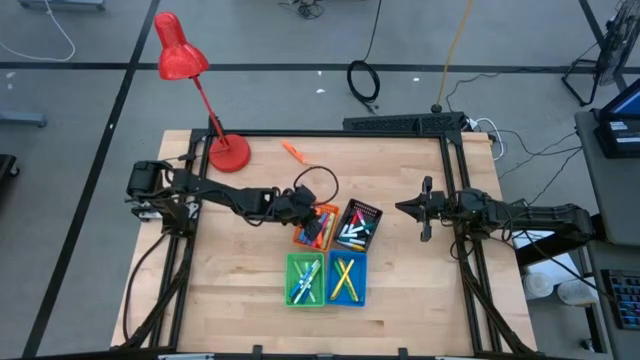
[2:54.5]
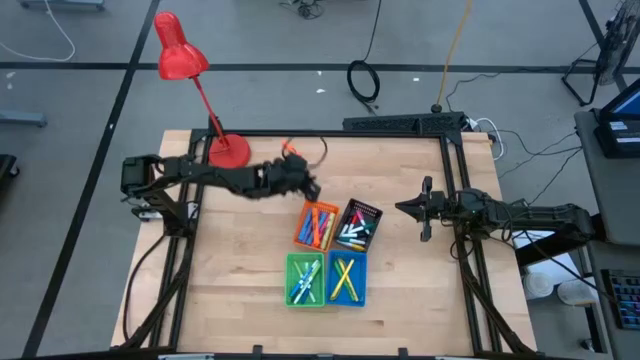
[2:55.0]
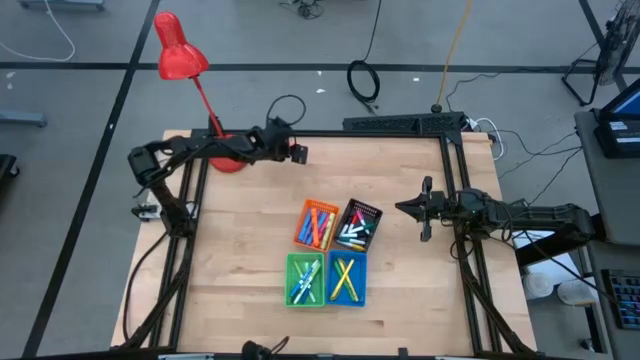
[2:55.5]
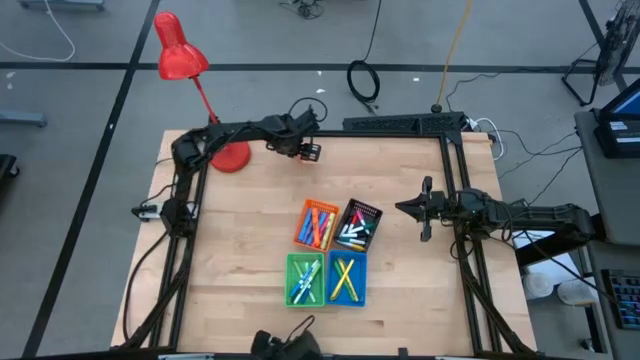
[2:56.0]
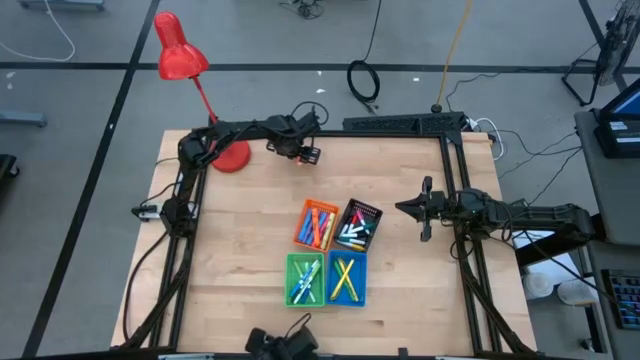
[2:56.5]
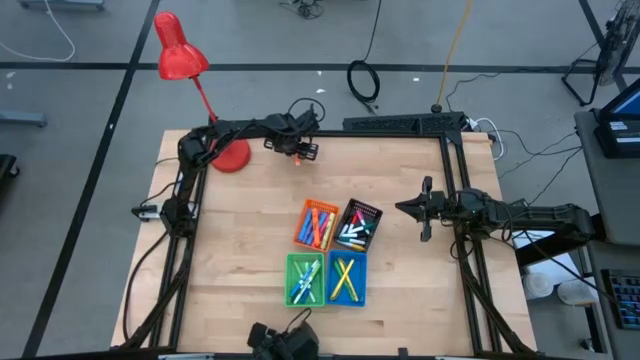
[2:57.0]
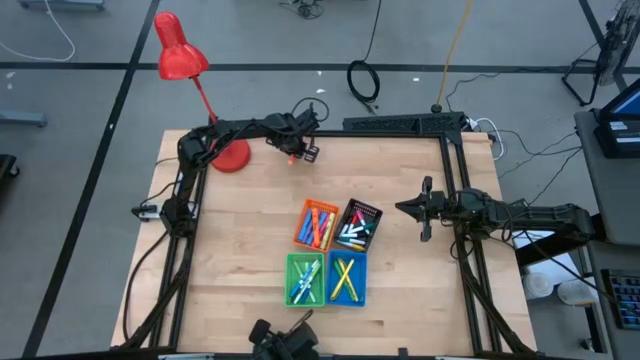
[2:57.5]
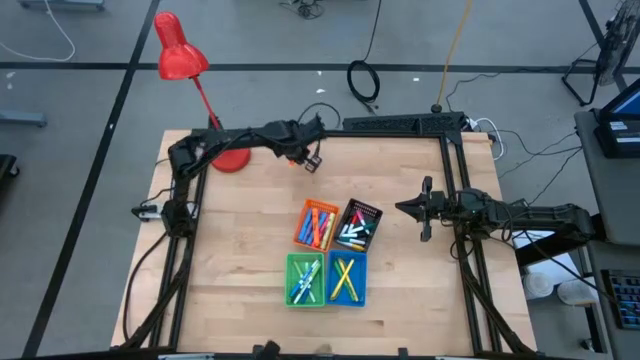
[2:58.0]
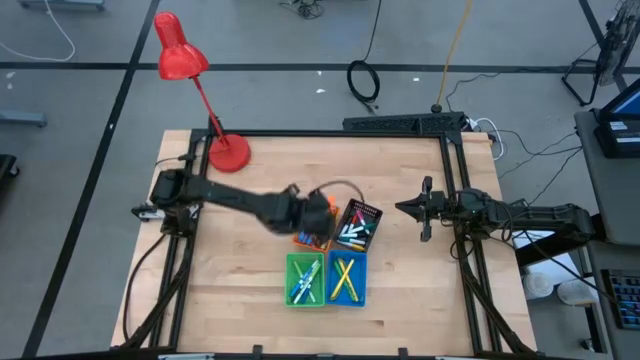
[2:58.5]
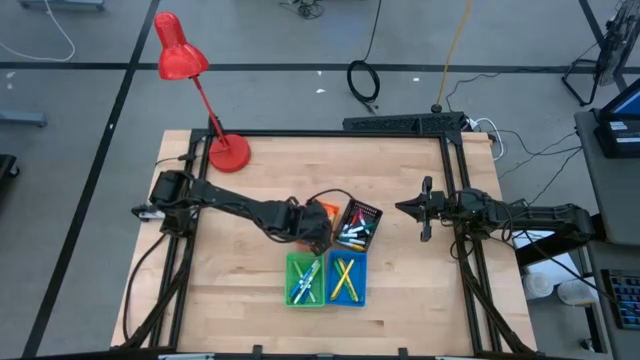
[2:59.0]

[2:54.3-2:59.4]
Task: Pick & Place Markers
Put the orange highlighter pen into the orange basket

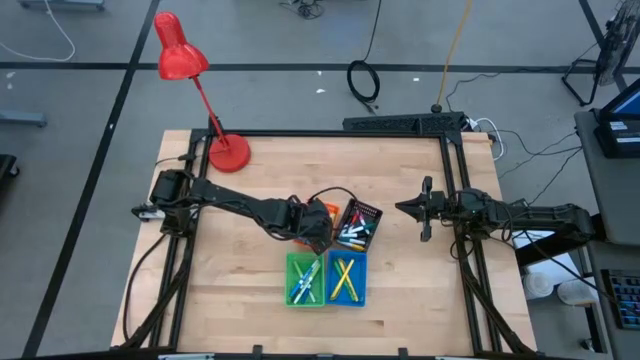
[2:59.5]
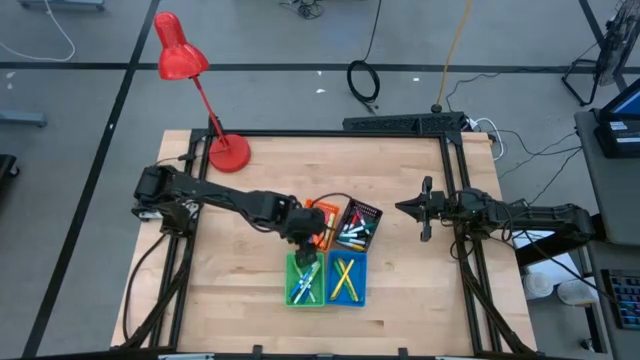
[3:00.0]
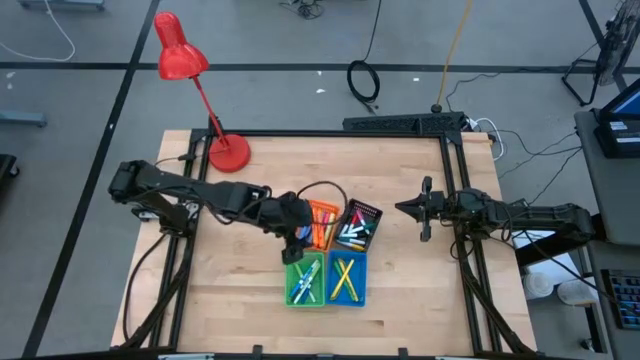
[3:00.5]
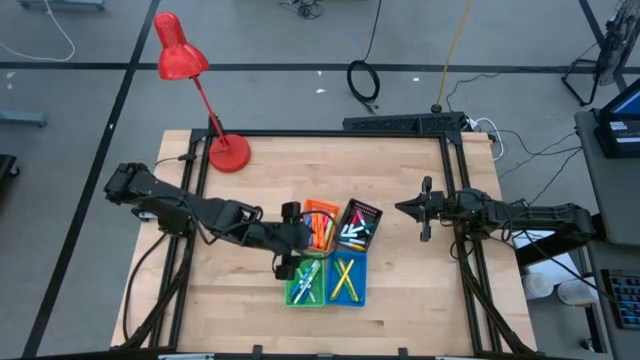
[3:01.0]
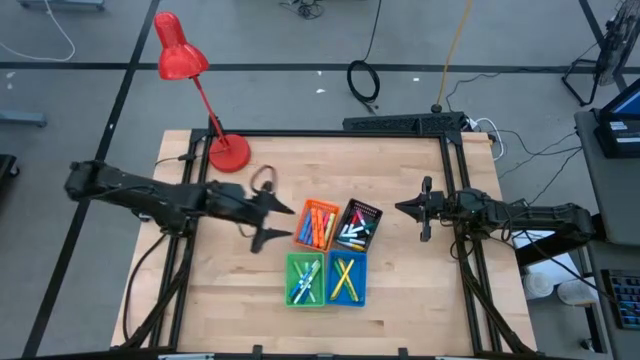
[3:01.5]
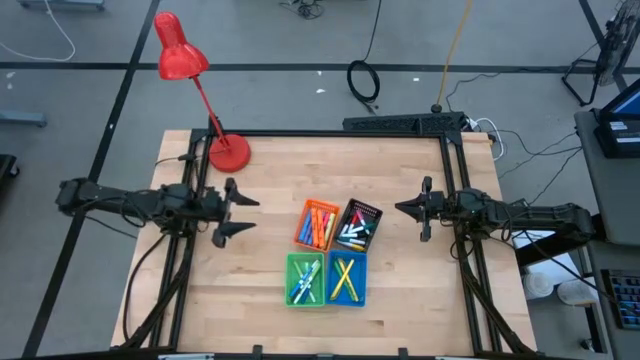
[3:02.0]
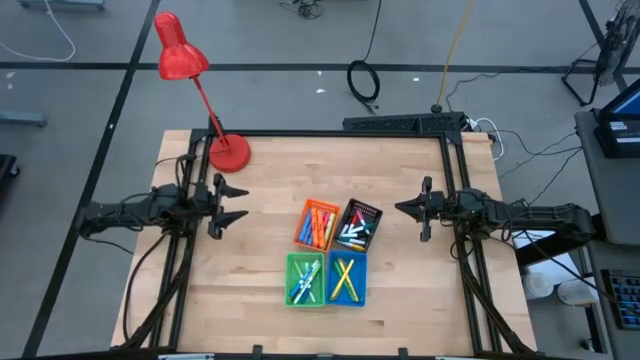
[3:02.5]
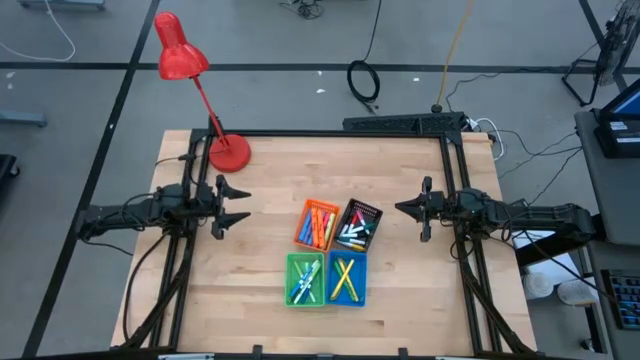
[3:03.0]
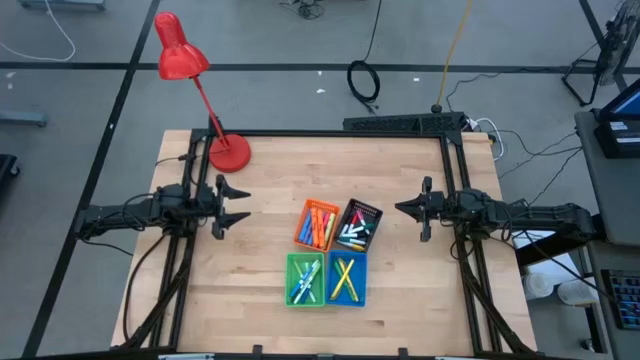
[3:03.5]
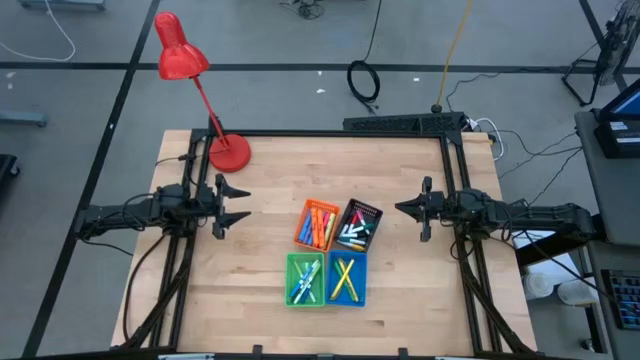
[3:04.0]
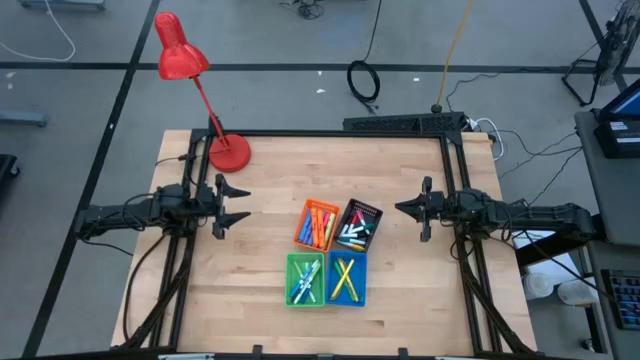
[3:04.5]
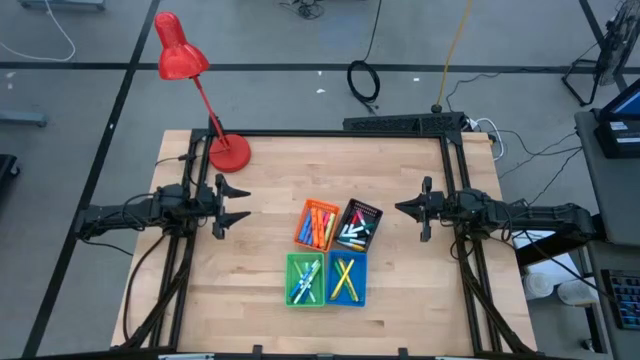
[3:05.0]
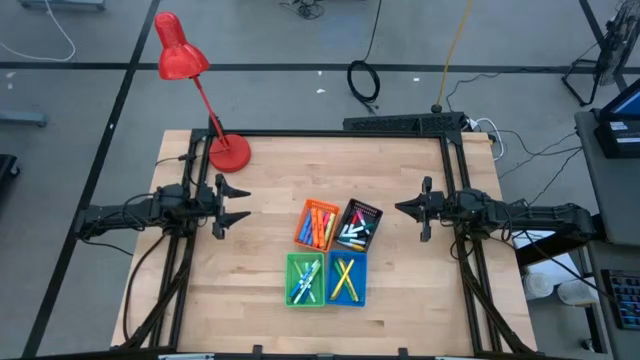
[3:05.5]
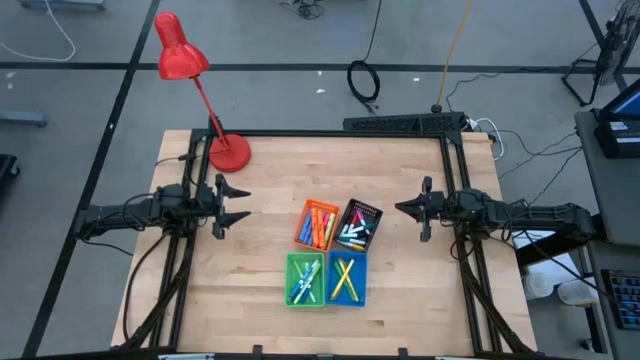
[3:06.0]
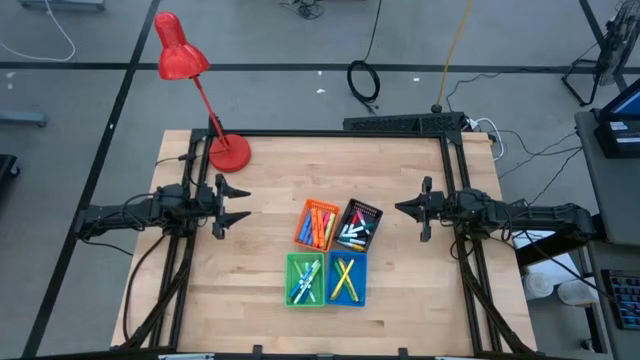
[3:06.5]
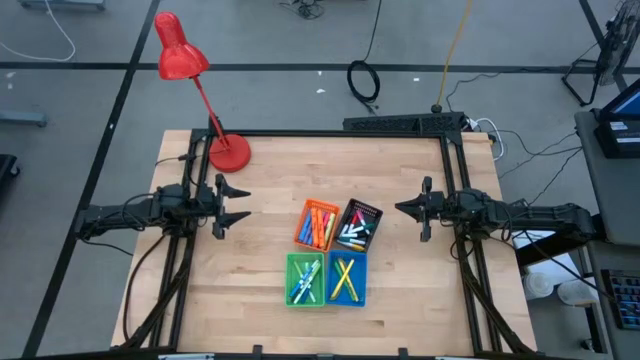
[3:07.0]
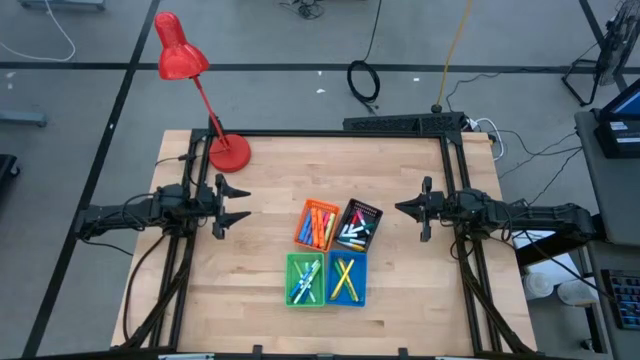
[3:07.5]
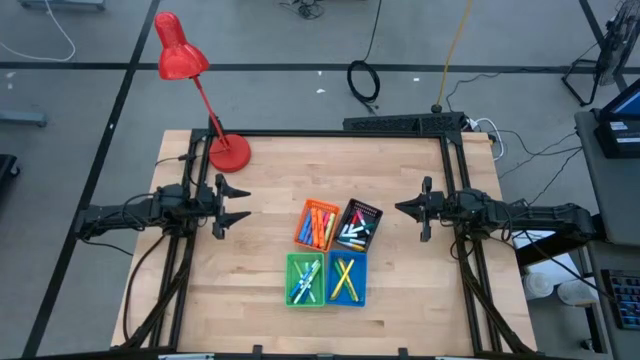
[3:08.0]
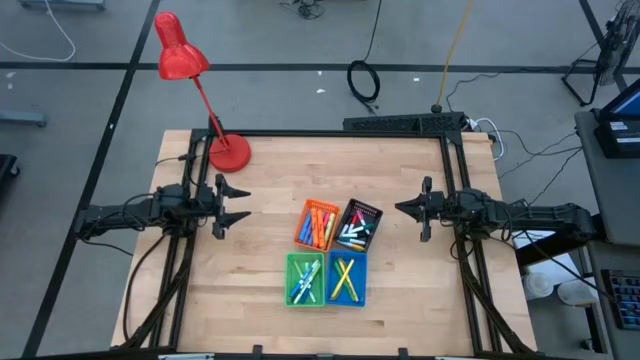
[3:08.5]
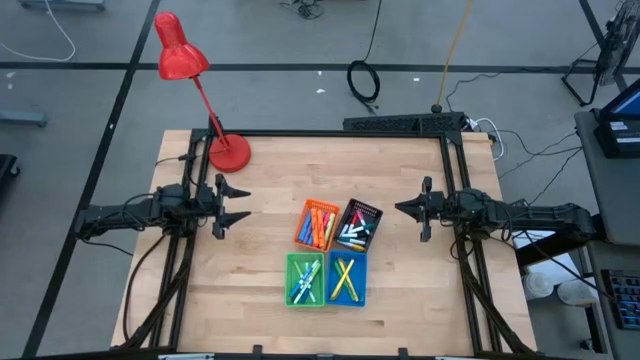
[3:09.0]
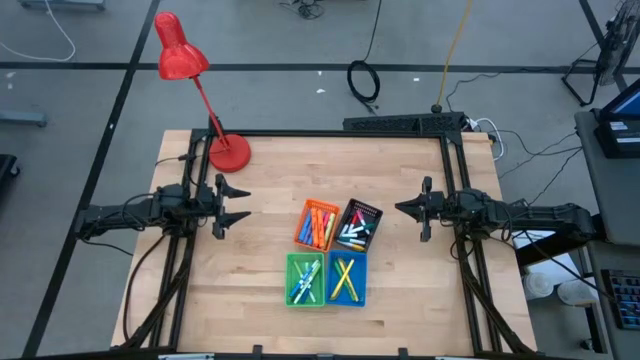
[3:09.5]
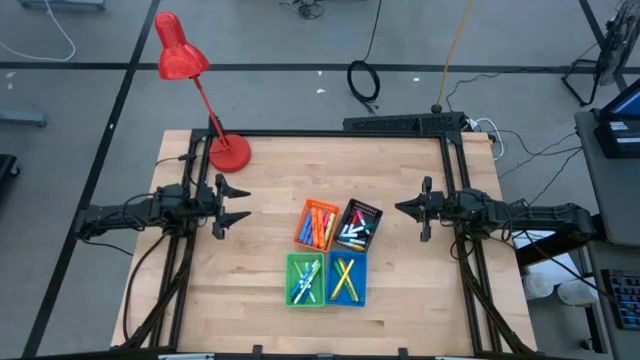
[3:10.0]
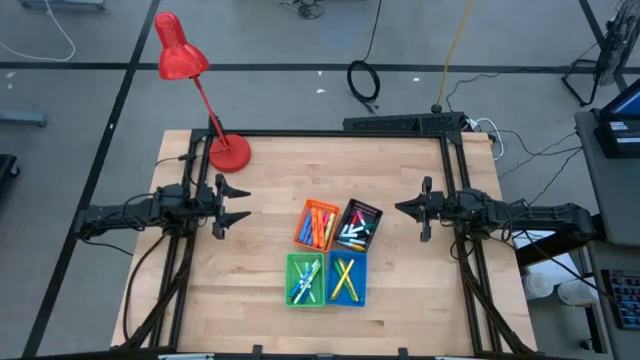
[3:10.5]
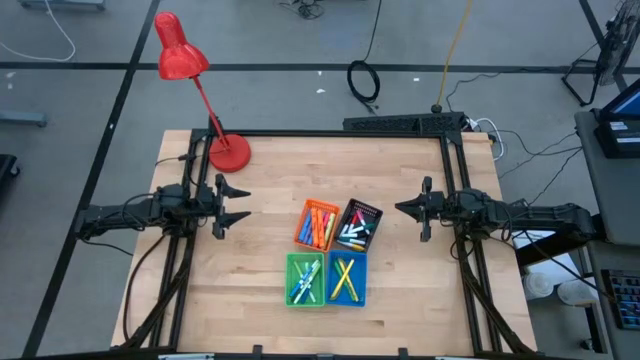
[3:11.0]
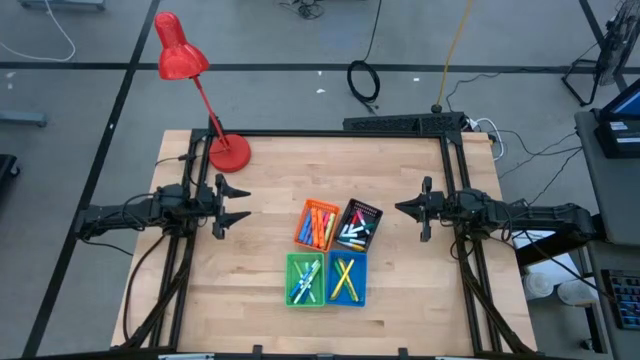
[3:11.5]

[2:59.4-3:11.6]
Return to Home Position

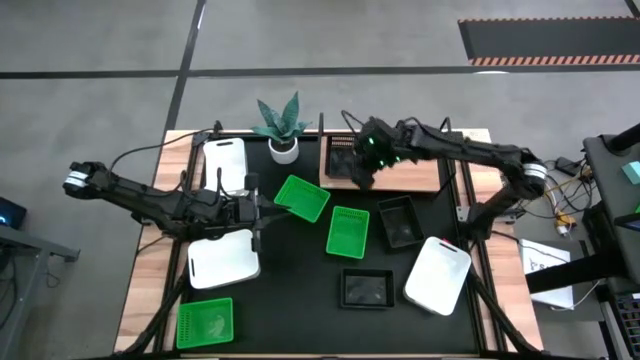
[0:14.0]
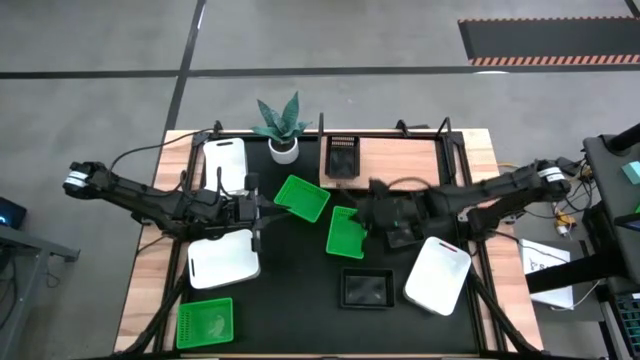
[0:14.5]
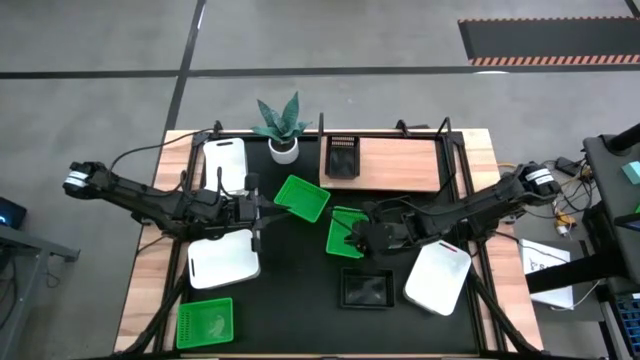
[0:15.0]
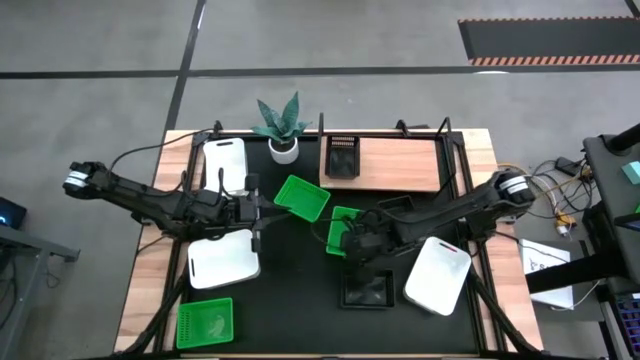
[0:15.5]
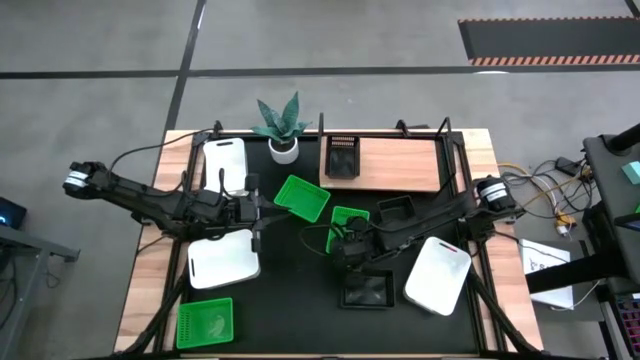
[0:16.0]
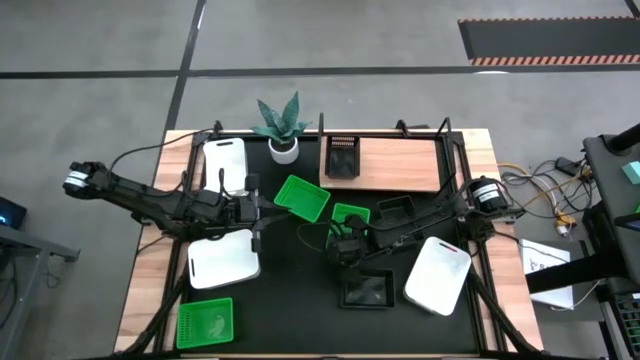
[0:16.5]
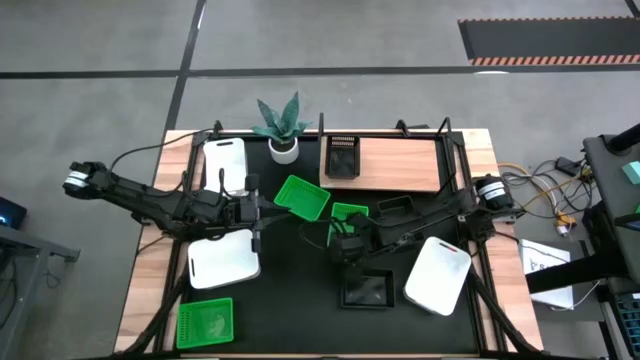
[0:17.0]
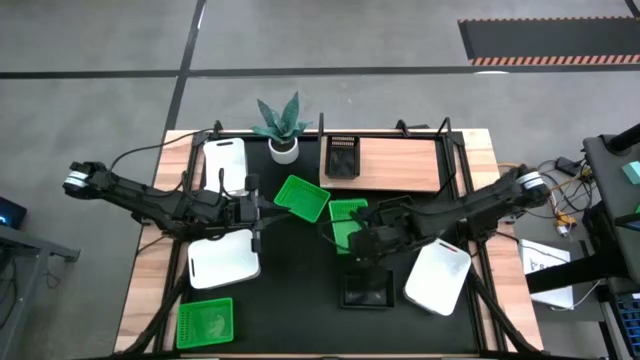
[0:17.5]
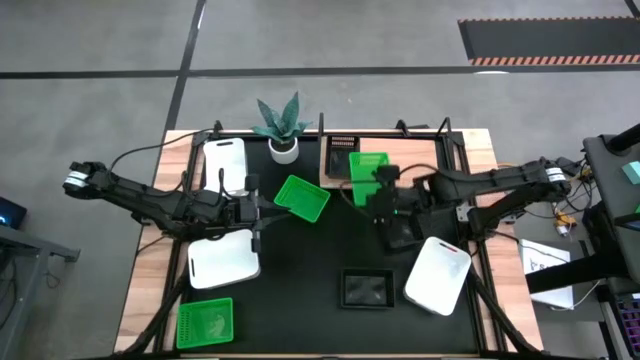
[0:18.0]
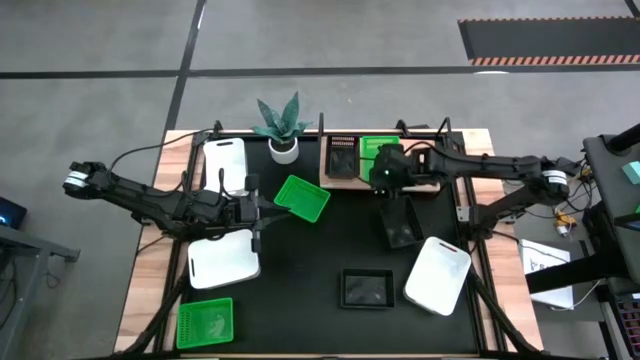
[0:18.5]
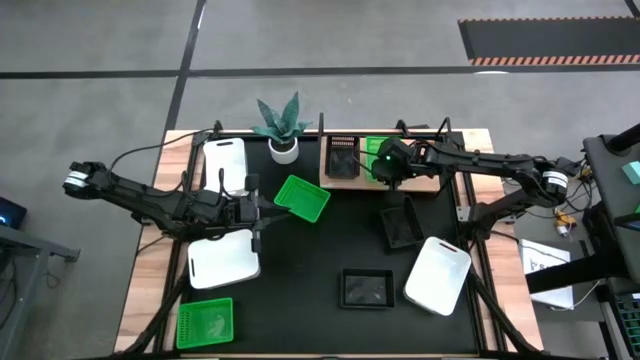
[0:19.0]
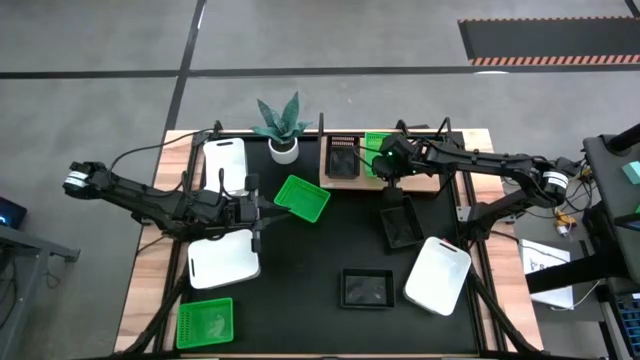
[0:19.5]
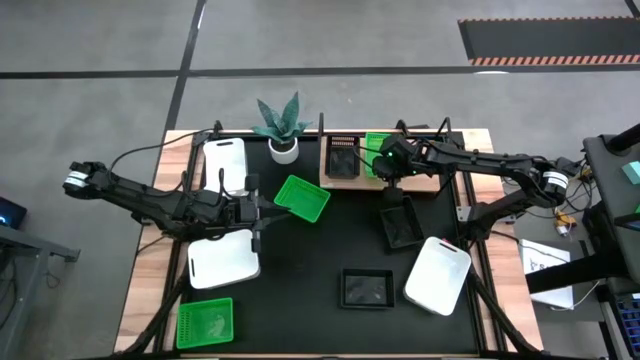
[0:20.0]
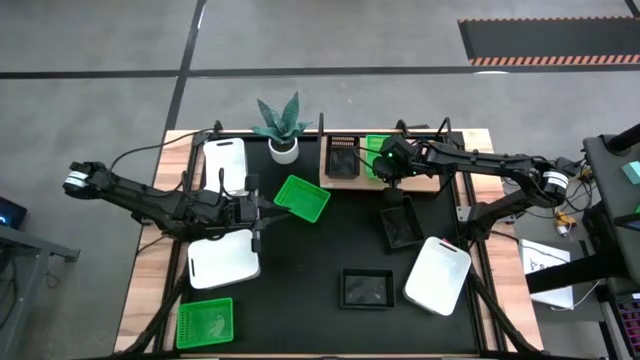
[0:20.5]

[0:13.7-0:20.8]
Task: Stack baskets on shelf by color
Put the top right green bin on the shelf
